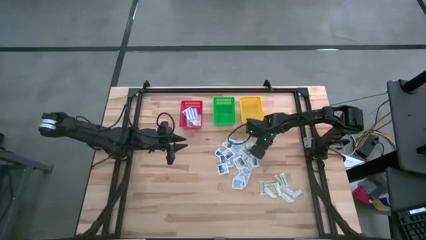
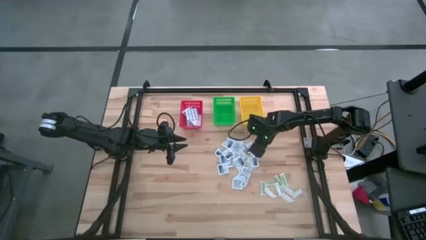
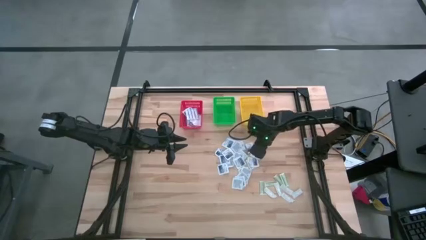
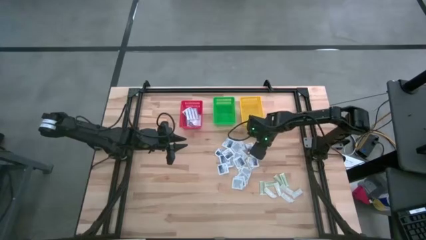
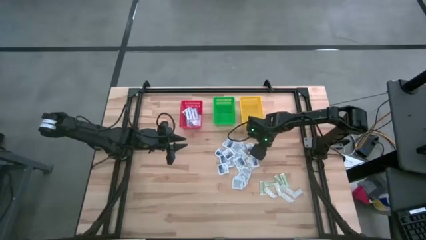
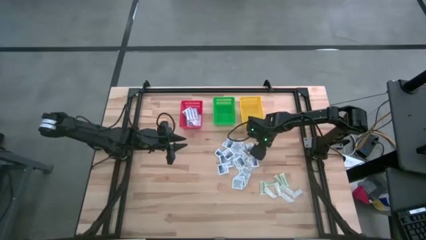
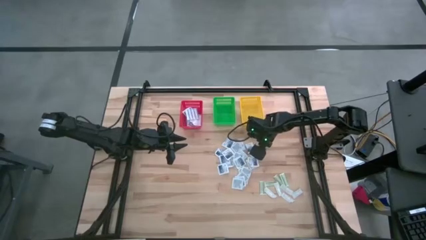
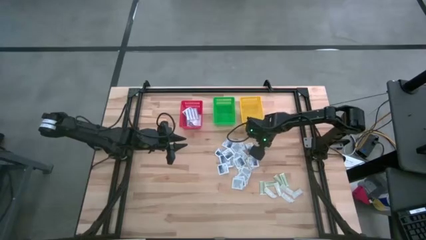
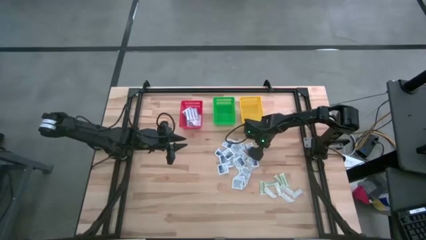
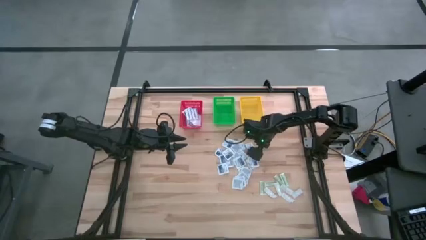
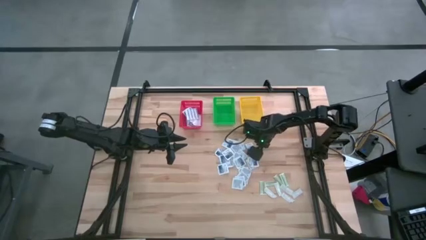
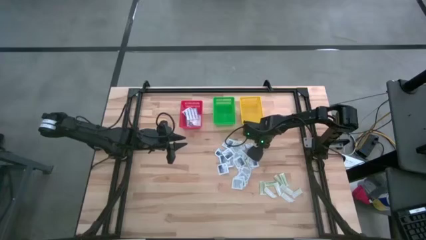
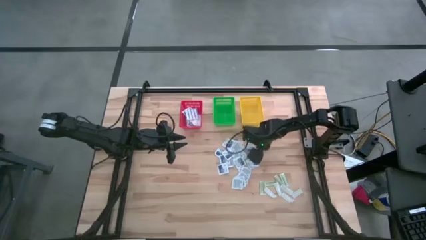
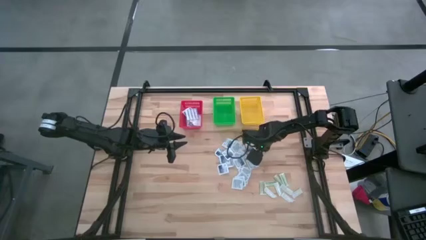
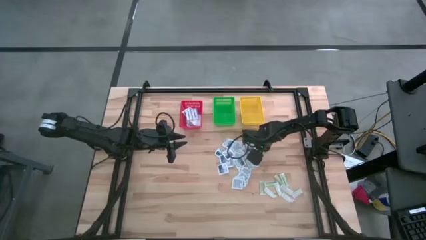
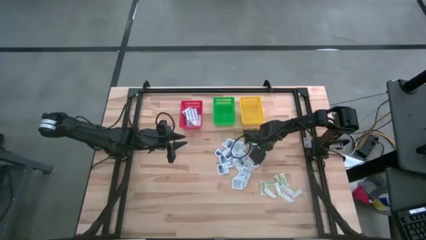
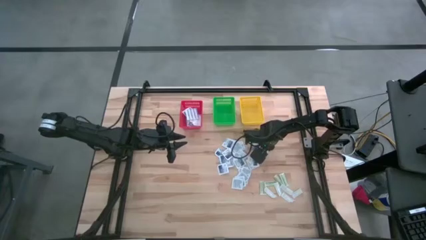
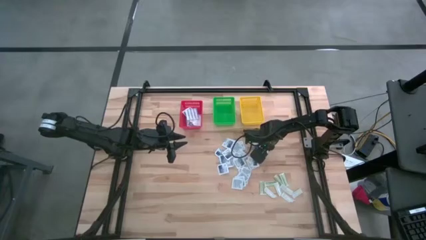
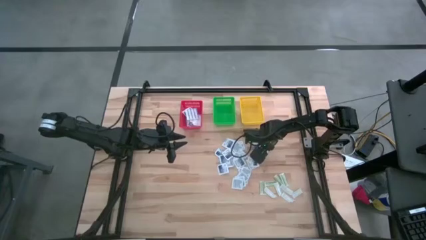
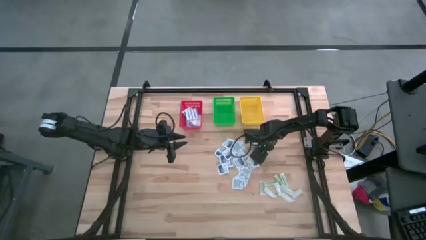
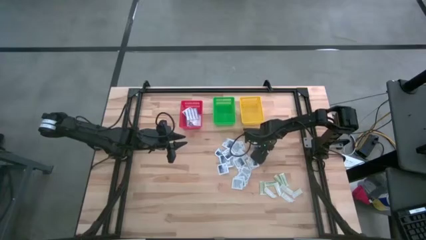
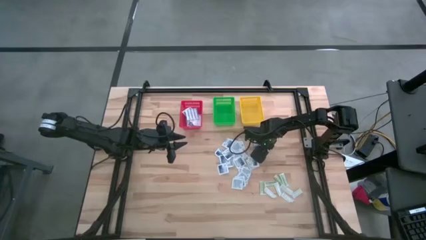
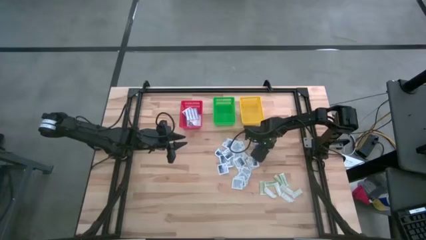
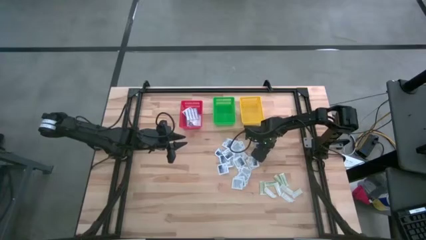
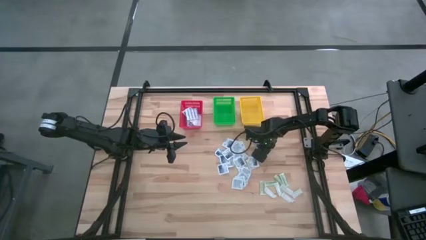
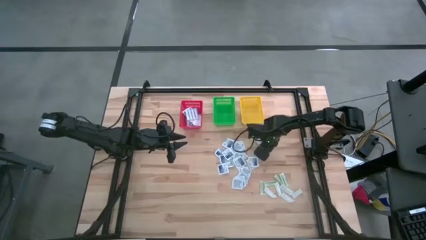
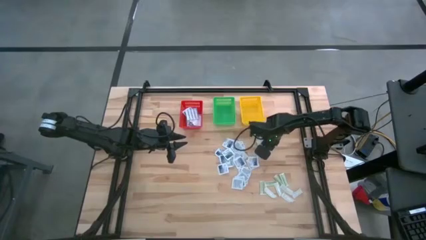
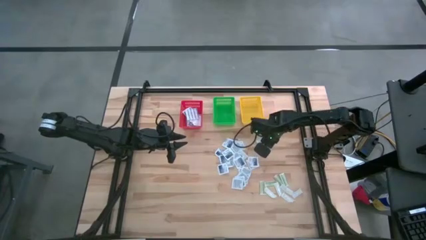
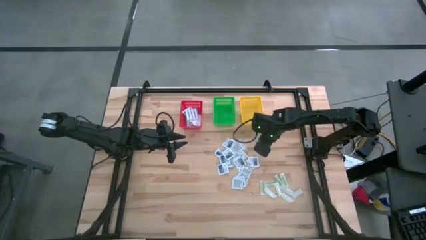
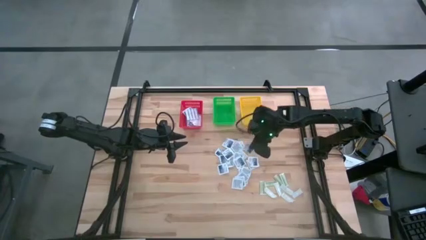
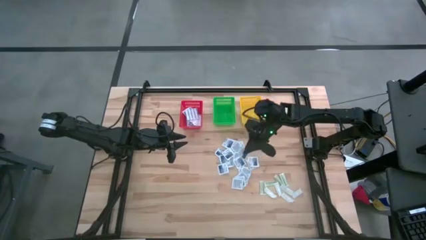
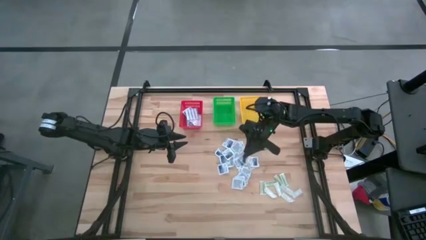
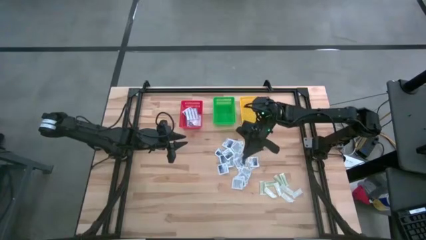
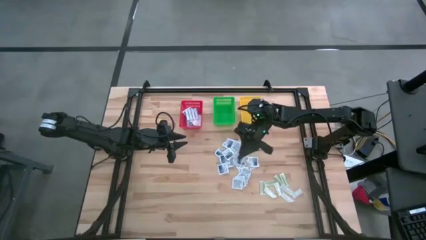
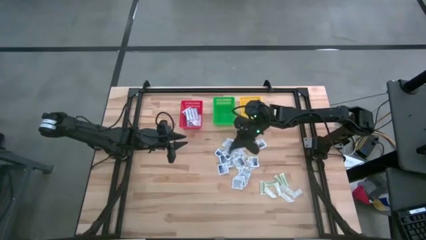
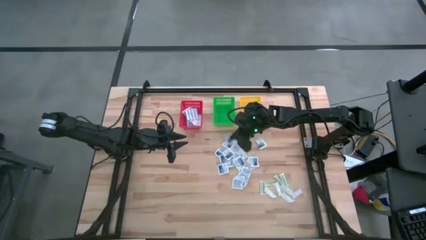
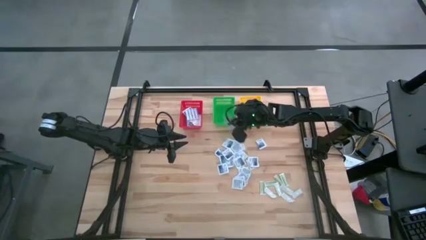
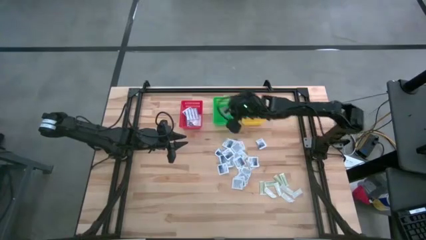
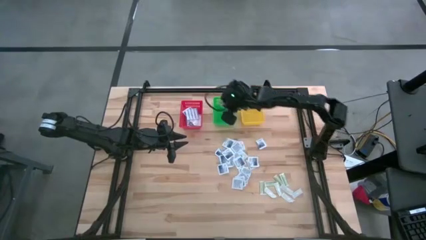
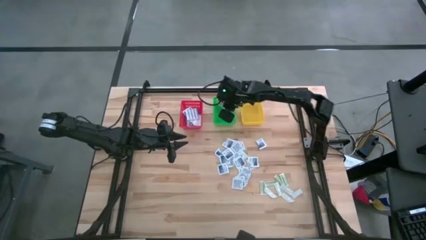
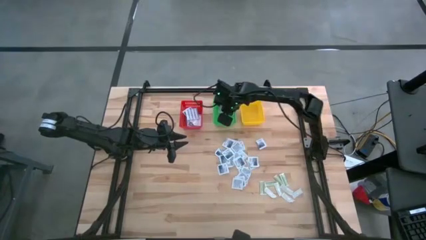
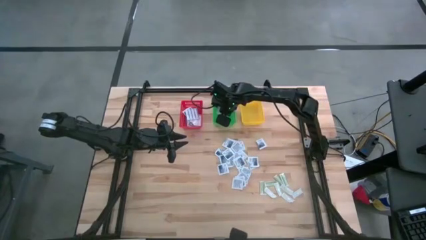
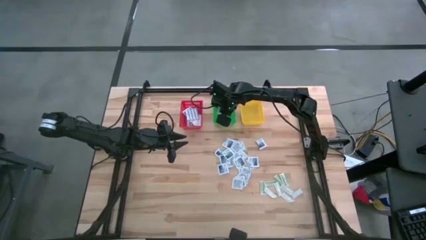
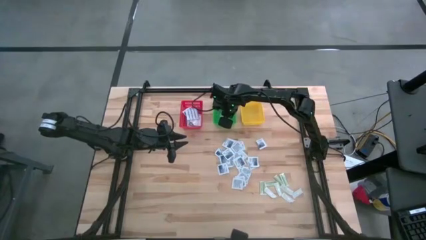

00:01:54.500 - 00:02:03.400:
Task: Pick & Place First Aid Supplies
Put the alcohol pad into the green basket

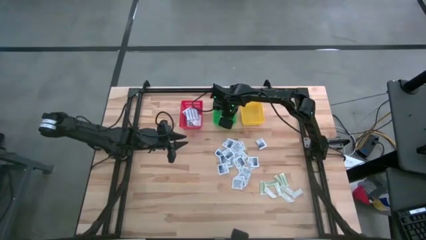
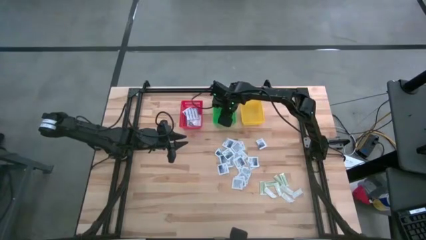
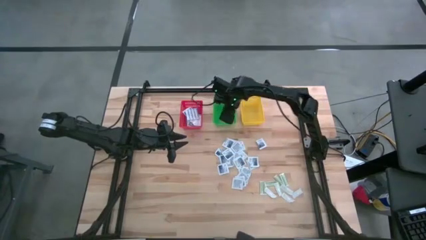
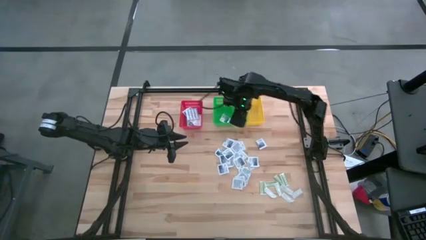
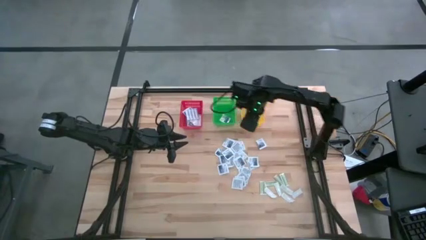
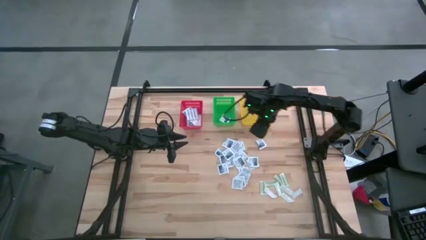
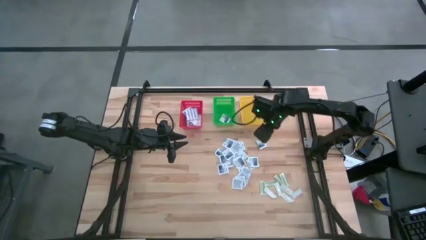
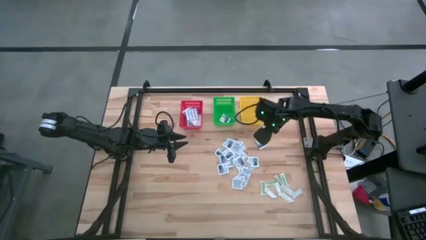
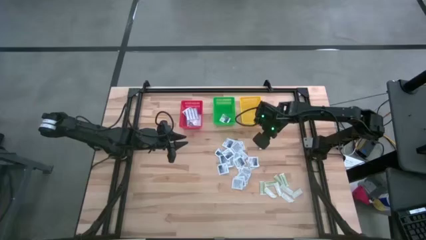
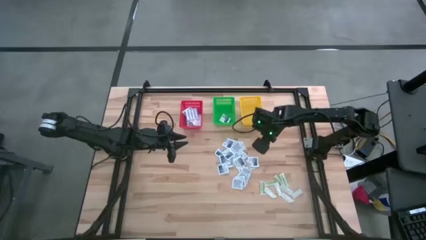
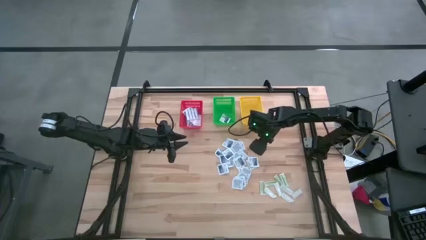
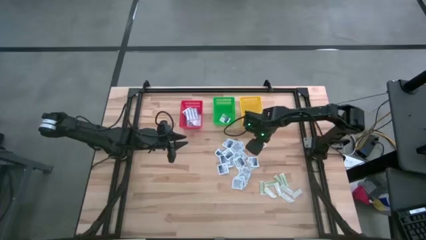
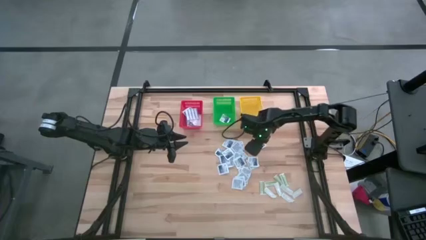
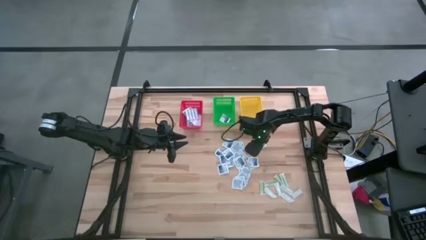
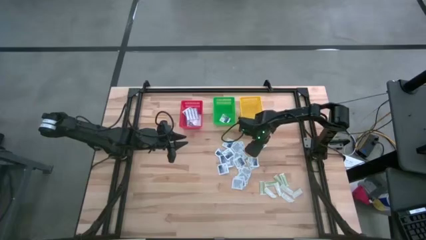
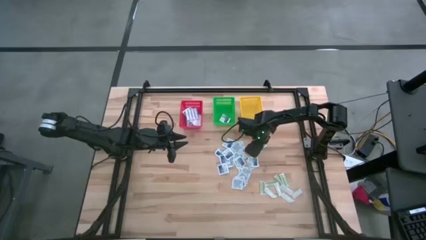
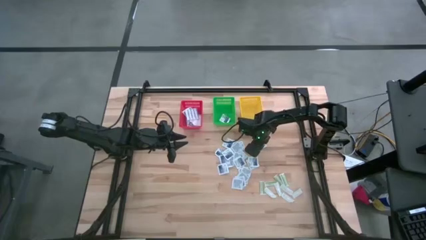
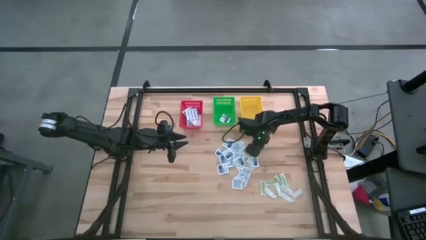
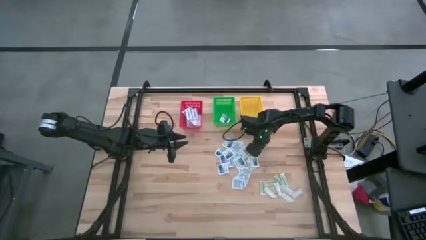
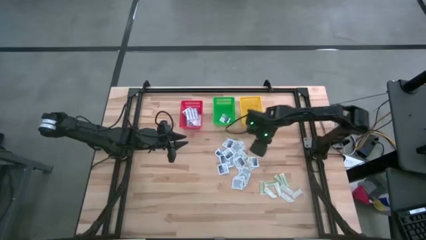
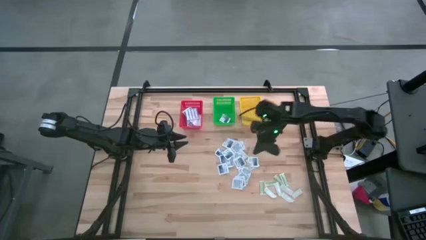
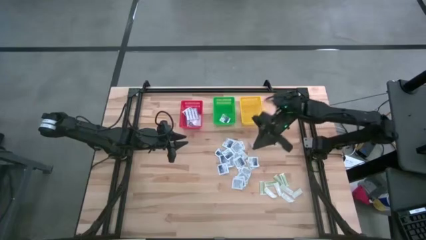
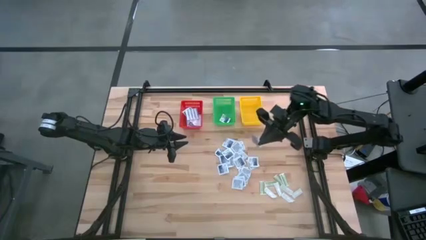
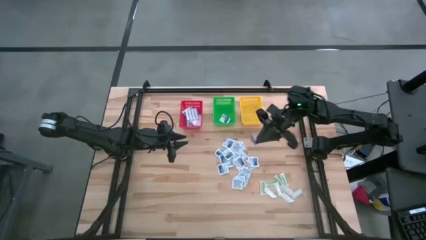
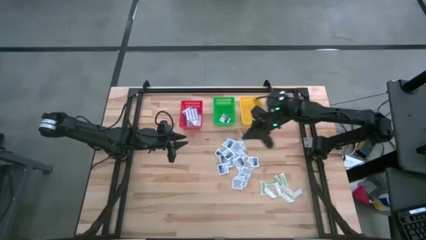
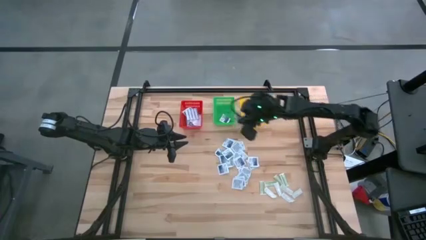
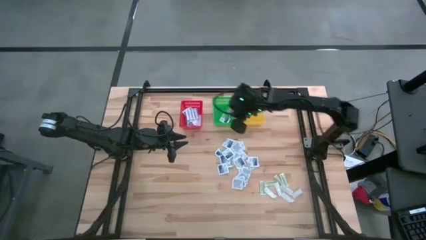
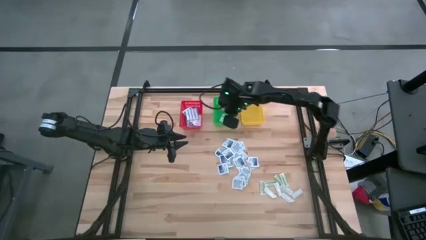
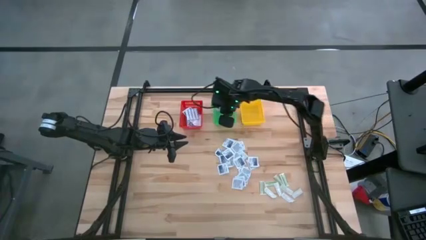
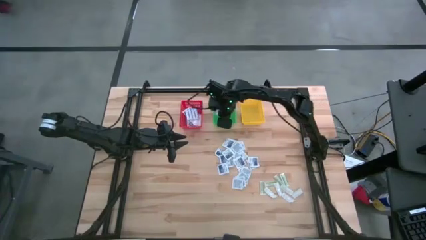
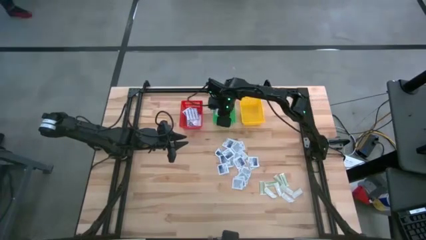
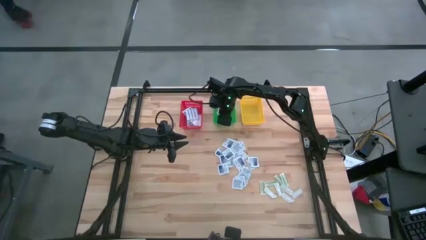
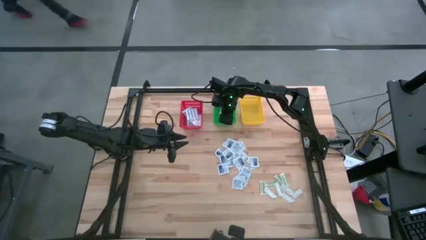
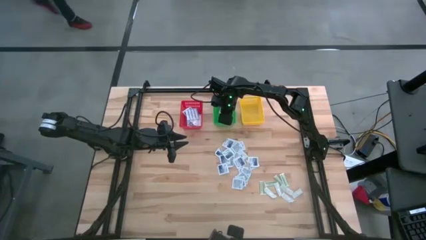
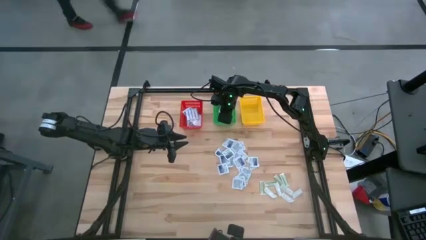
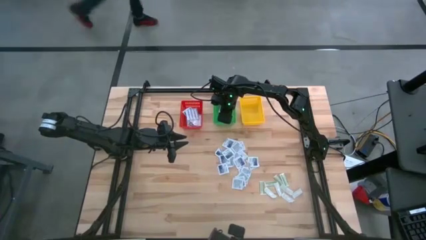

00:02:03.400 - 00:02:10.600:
Put the alcohol pad into the green basket
